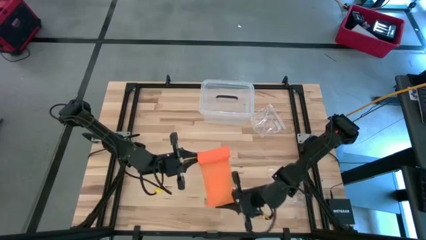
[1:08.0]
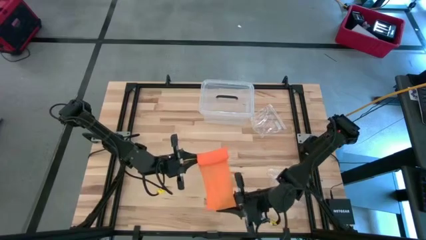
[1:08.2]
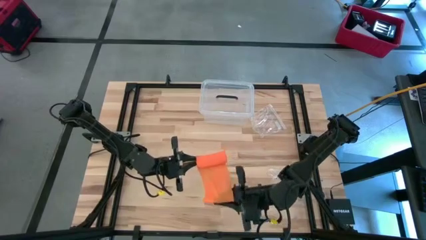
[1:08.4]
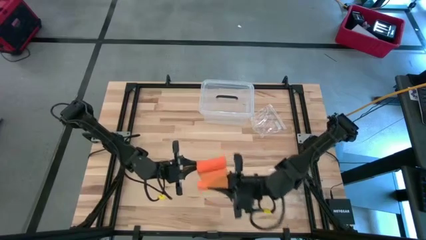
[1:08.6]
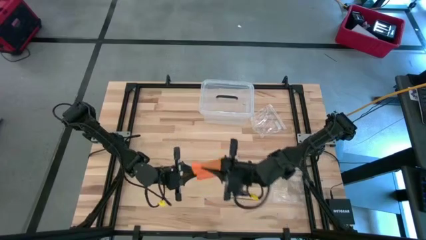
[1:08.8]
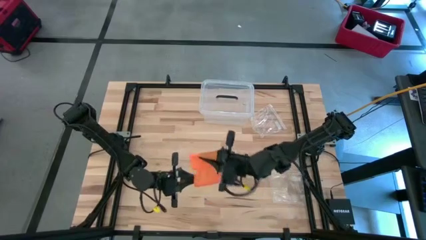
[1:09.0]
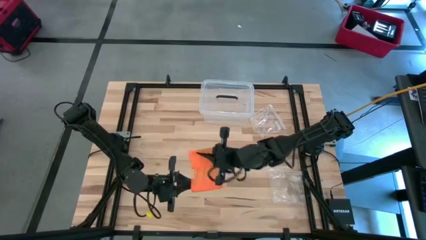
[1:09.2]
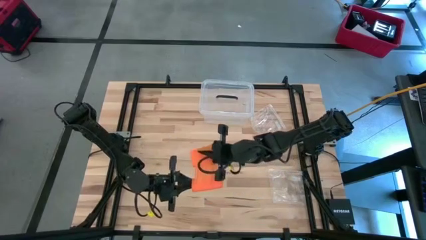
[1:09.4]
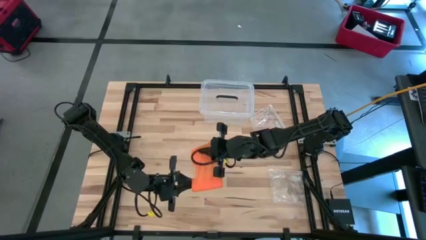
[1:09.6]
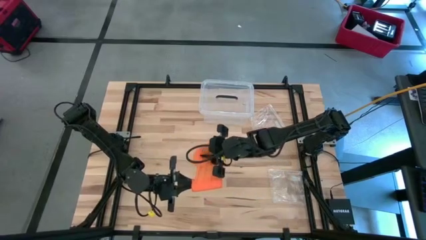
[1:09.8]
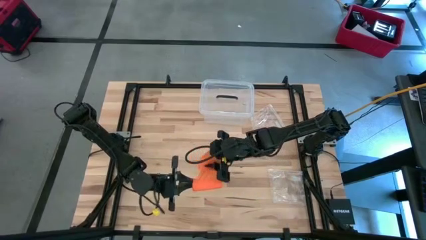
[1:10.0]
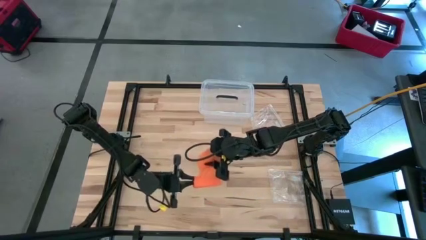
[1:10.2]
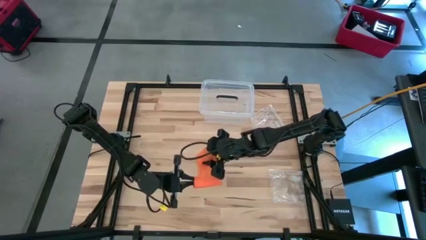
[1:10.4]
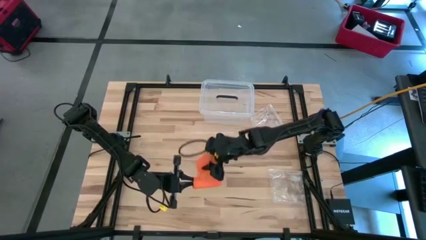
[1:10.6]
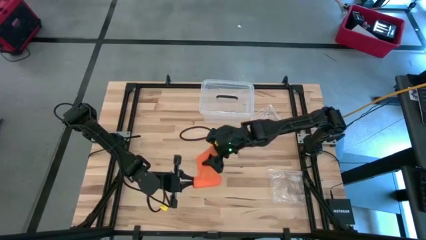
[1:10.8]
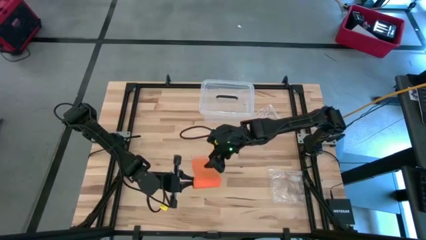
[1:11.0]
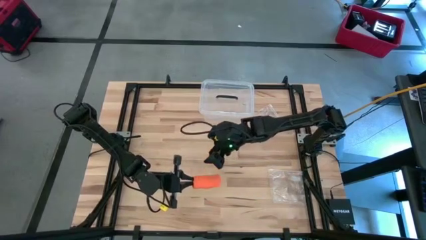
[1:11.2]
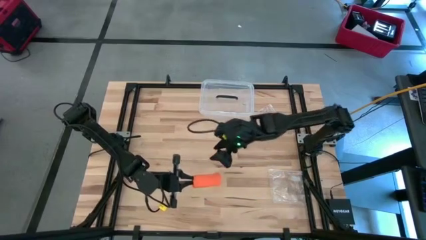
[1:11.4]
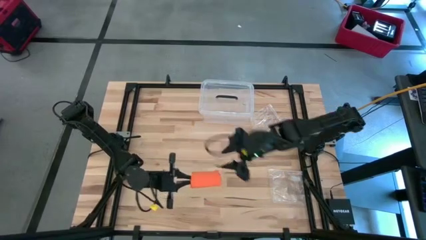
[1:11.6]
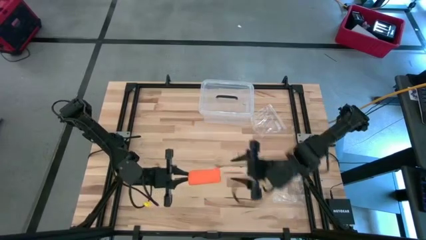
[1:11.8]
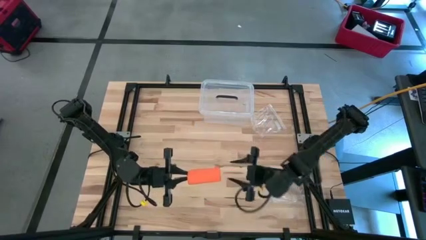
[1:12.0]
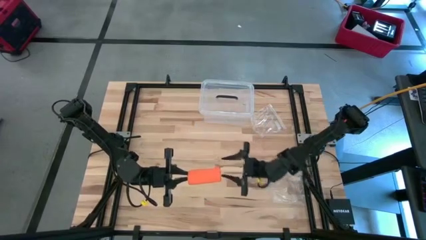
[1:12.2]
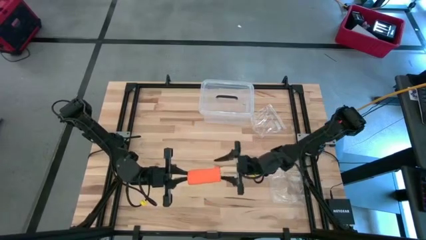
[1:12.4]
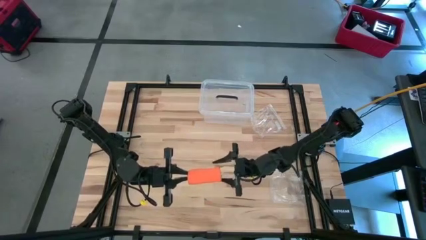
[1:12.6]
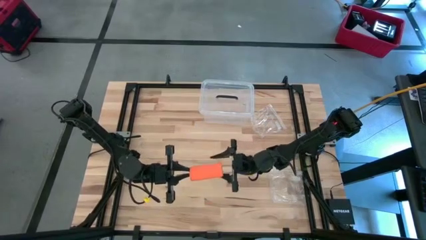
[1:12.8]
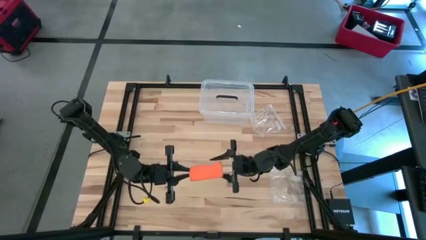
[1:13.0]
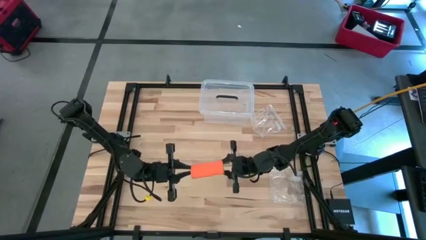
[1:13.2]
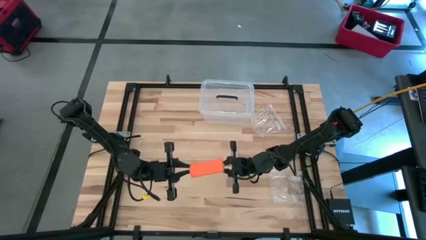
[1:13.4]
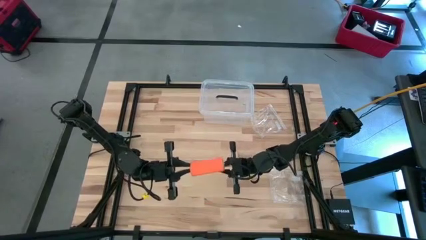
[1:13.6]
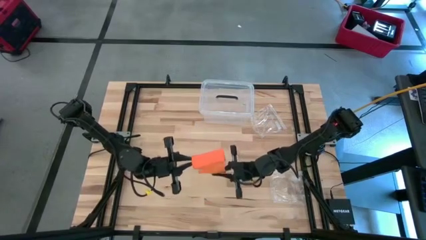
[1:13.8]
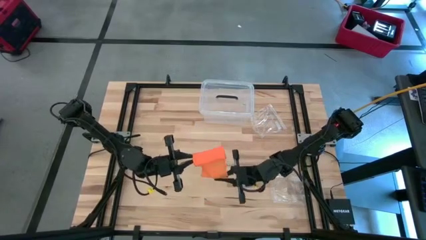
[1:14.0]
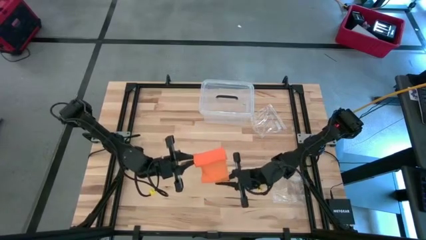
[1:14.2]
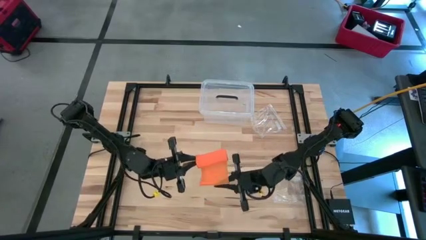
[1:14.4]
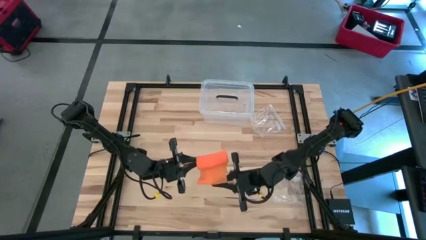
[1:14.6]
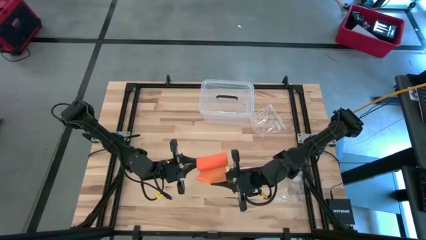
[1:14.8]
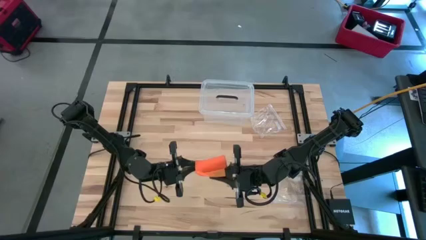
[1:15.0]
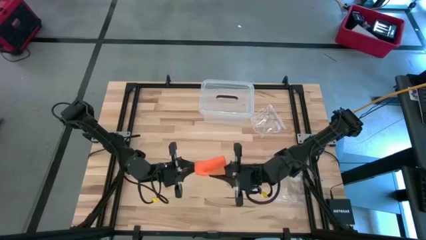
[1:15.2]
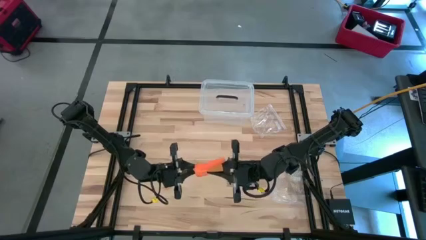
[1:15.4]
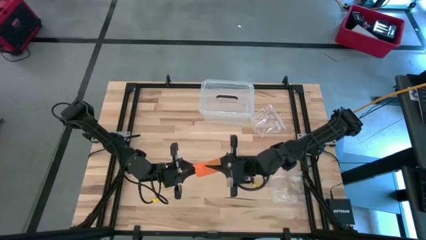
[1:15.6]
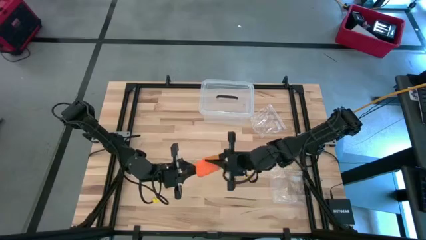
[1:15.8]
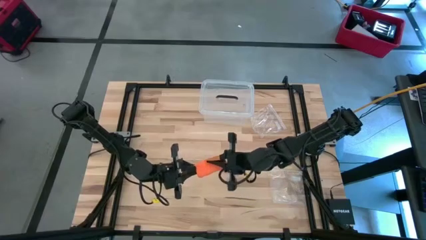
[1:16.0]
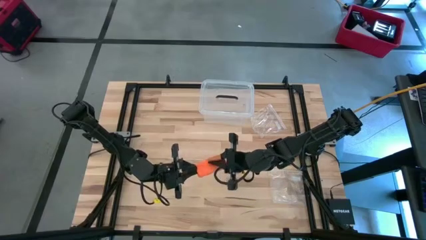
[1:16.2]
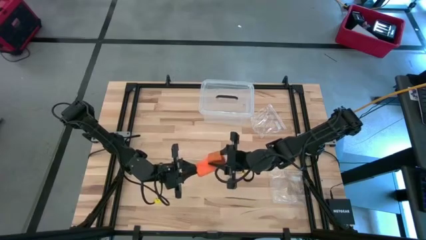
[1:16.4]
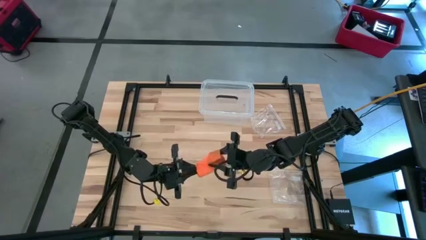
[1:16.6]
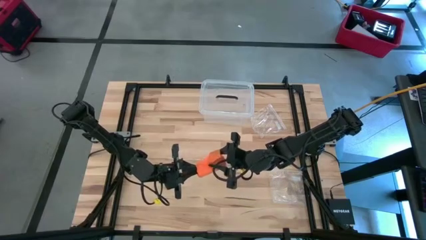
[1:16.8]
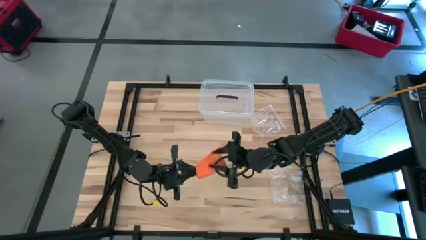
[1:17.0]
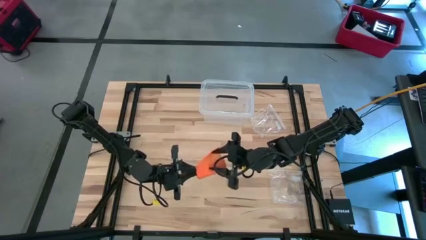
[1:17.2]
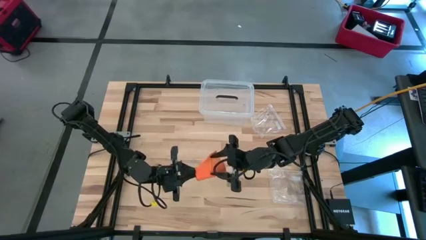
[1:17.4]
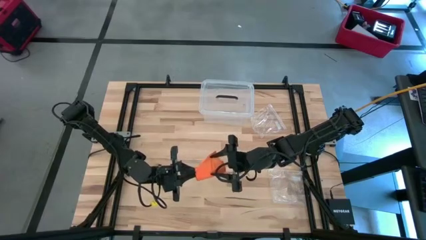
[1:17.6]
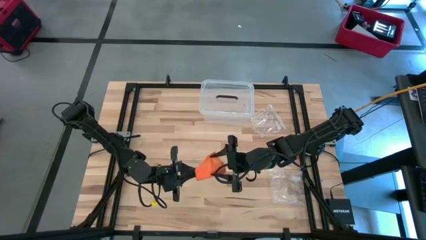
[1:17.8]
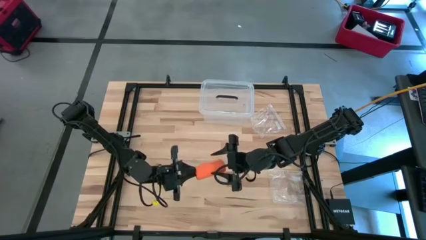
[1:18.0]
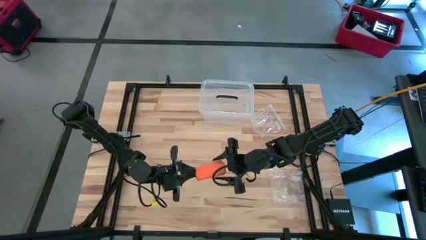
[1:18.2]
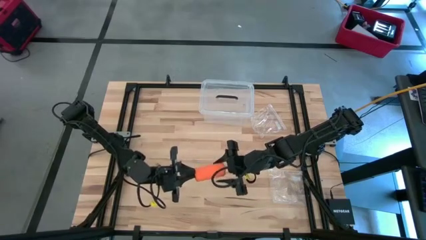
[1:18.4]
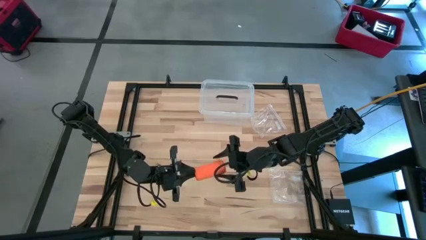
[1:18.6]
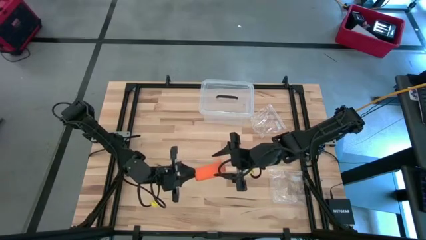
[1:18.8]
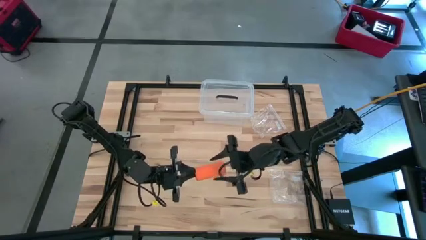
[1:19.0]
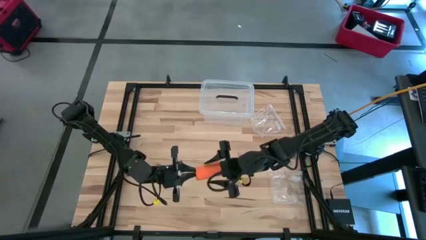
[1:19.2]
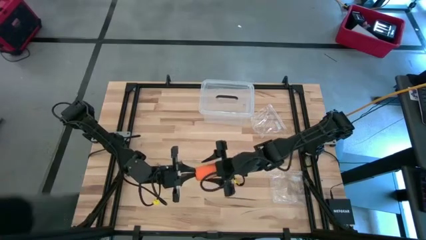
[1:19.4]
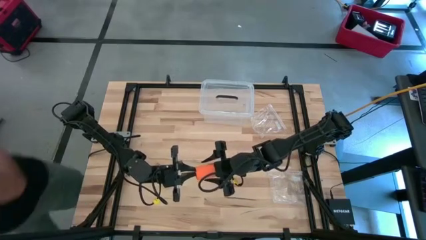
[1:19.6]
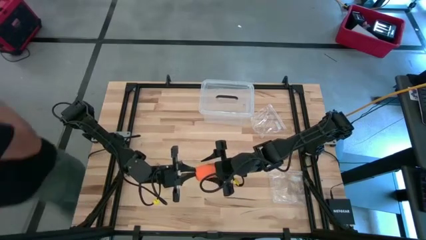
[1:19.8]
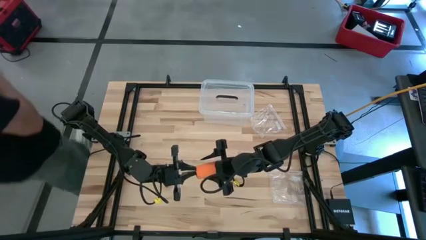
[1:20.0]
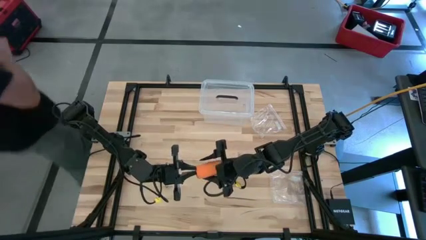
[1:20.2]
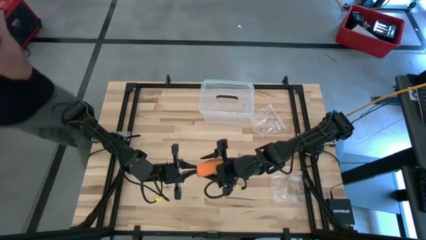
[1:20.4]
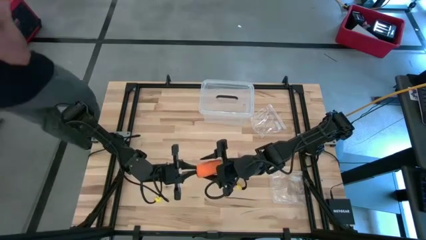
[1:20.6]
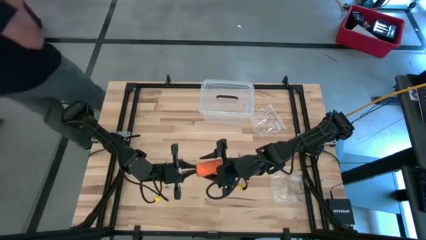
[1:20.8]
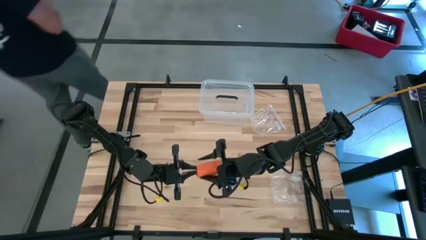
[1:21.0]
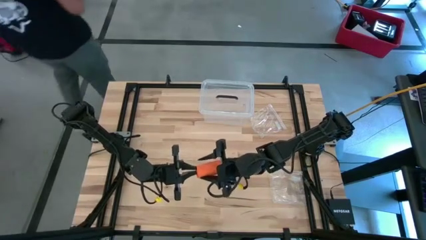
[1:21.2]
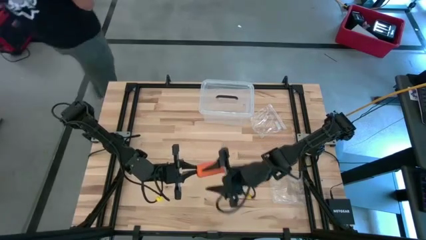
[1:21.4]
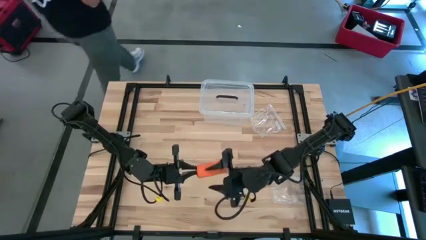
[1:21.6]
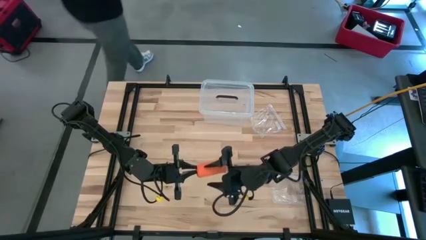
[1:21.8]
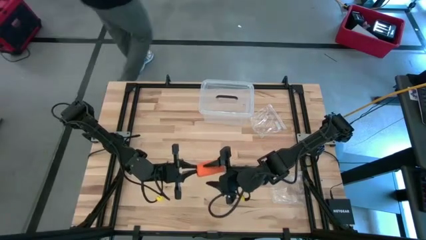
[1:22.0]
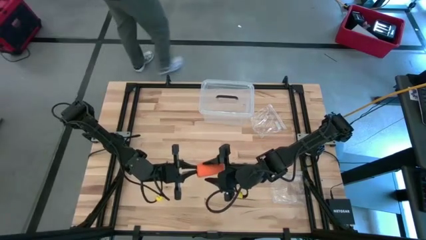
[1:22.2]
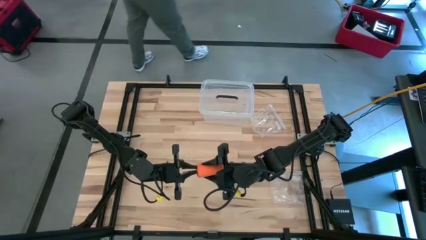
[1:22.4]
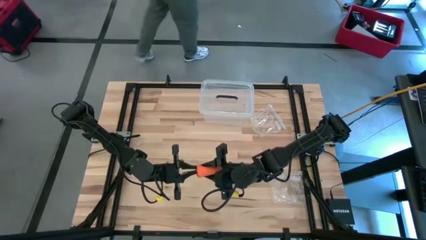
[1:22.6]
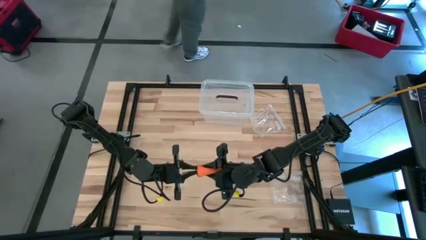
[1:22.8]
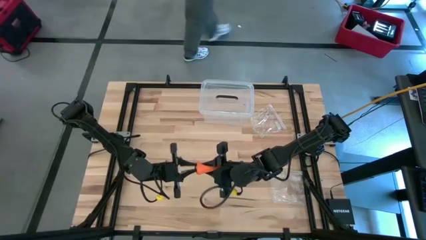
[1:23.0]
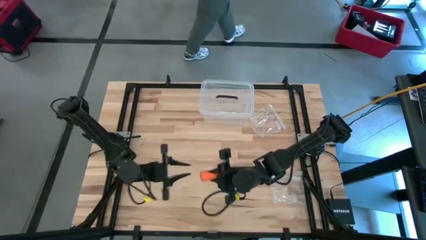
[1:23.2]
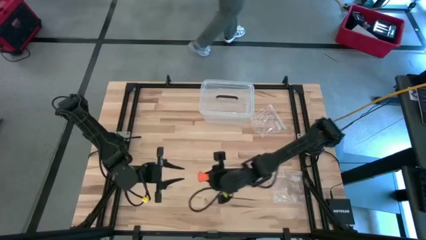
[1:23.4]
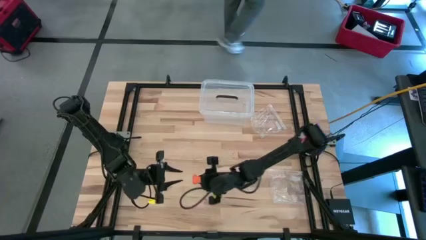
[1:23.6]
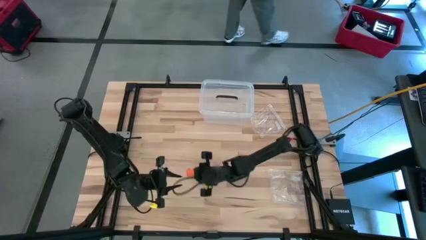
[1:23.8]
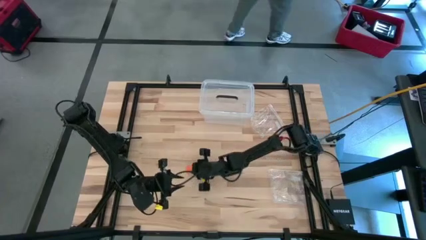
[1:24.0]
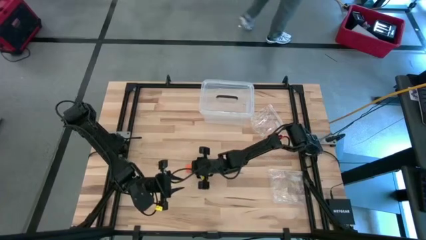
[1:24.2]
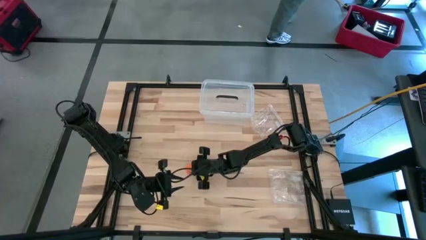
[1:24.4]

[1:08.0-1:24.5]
Task: Roll bandage
Roll the orange bandage
